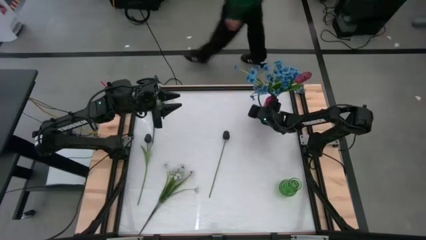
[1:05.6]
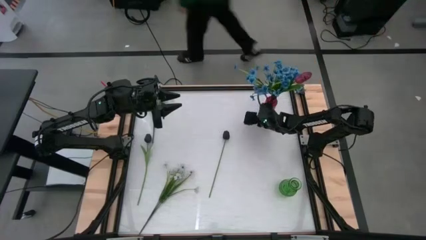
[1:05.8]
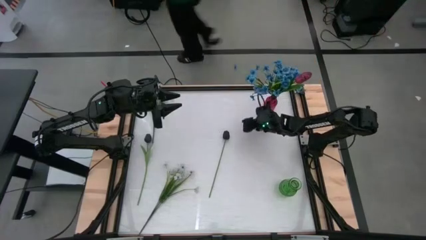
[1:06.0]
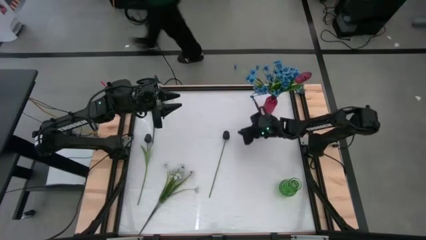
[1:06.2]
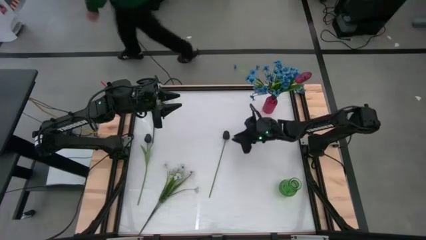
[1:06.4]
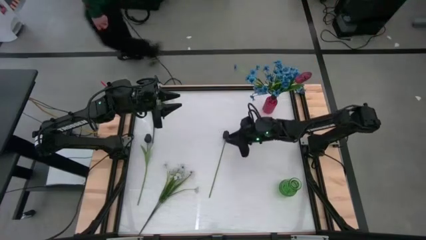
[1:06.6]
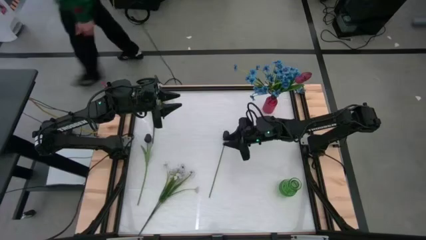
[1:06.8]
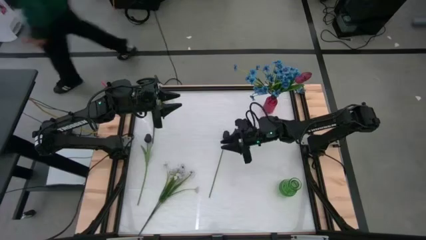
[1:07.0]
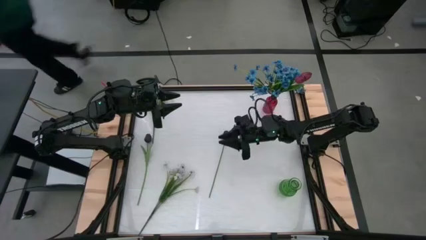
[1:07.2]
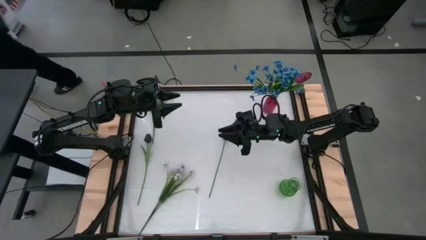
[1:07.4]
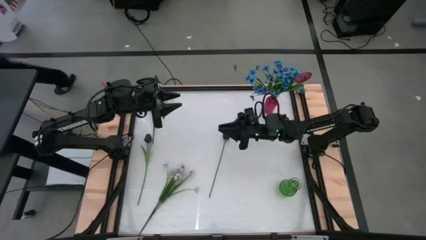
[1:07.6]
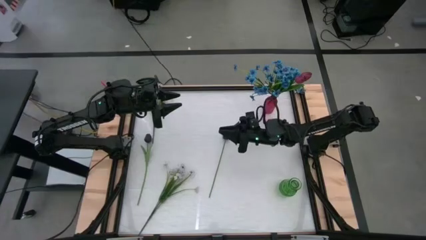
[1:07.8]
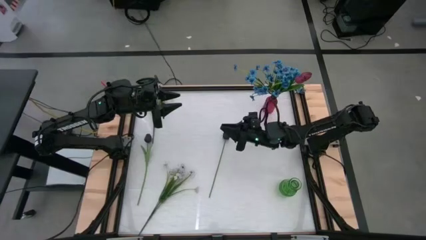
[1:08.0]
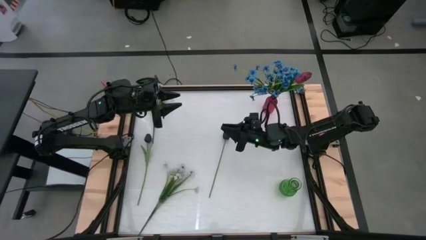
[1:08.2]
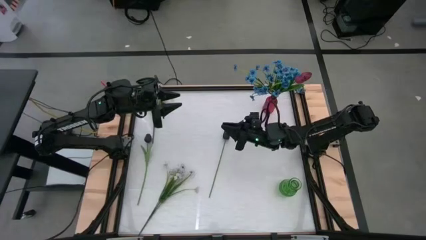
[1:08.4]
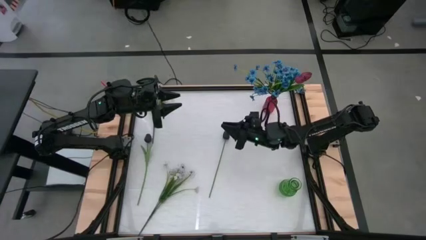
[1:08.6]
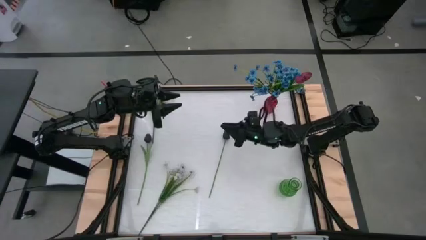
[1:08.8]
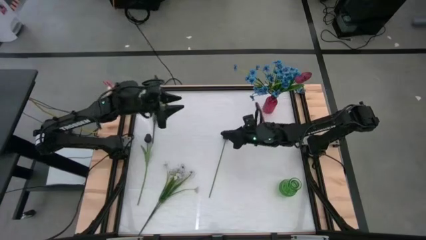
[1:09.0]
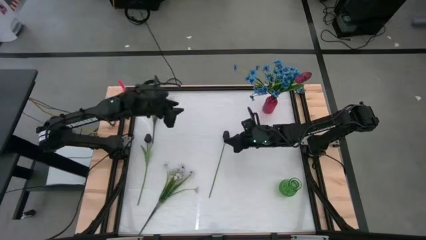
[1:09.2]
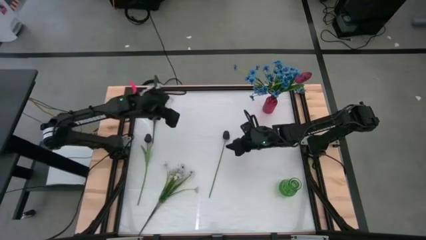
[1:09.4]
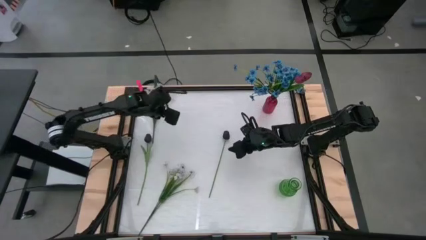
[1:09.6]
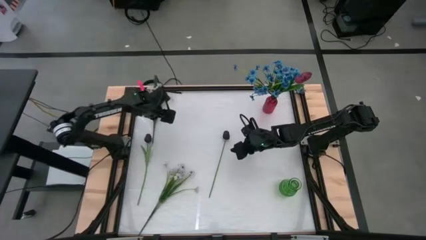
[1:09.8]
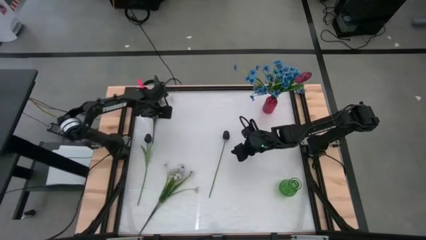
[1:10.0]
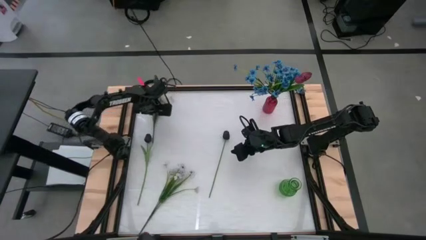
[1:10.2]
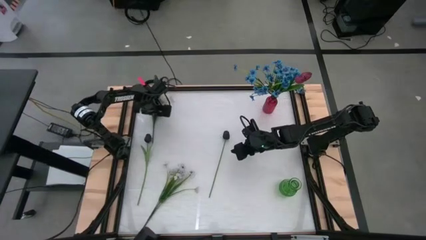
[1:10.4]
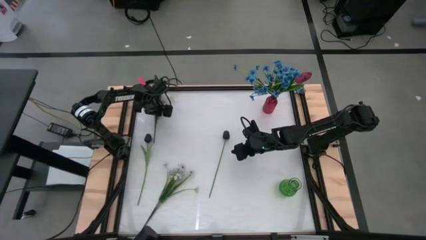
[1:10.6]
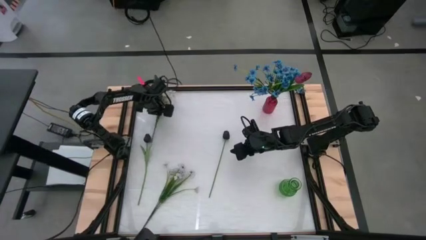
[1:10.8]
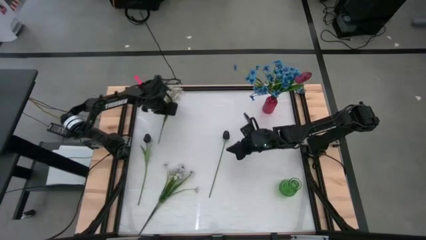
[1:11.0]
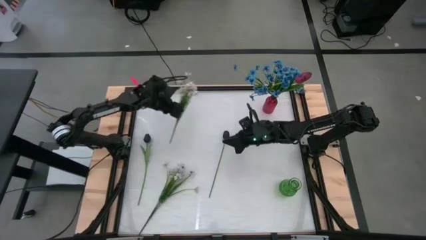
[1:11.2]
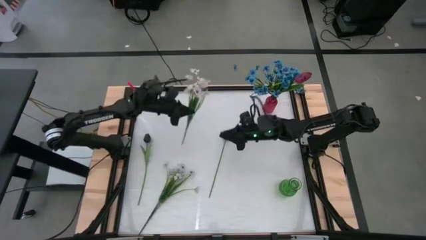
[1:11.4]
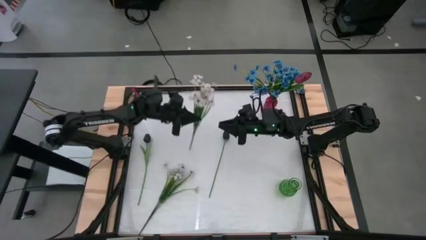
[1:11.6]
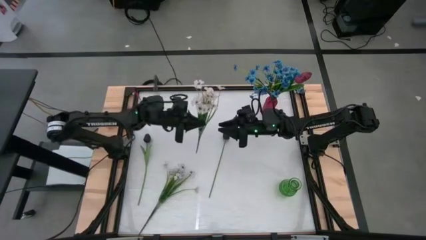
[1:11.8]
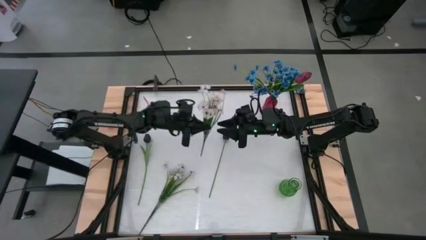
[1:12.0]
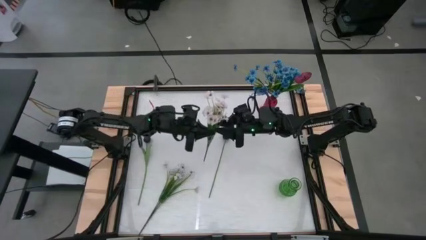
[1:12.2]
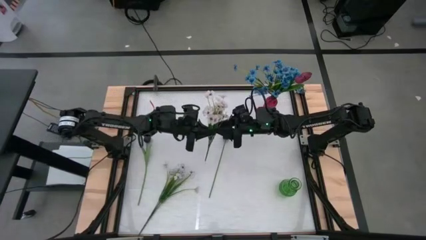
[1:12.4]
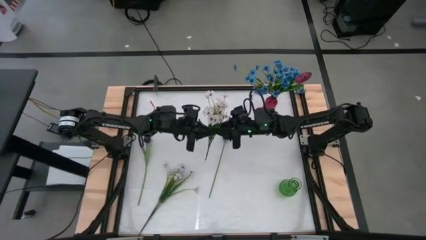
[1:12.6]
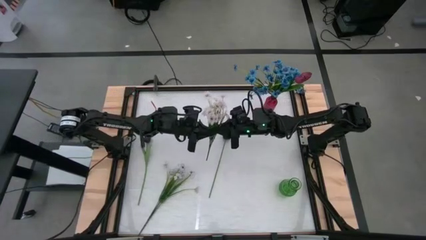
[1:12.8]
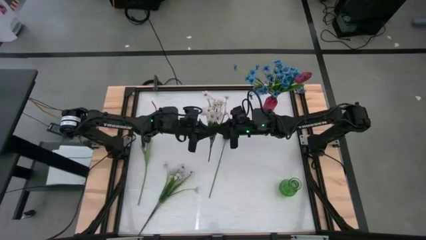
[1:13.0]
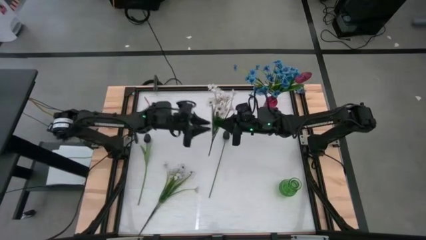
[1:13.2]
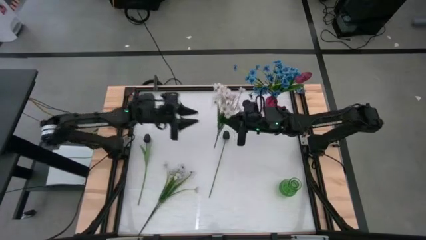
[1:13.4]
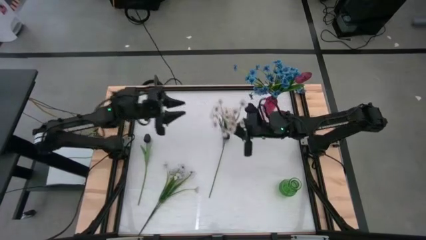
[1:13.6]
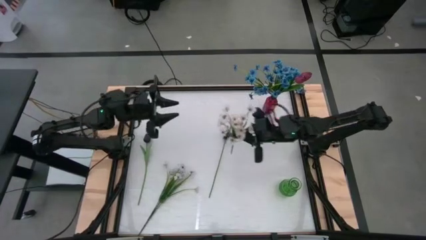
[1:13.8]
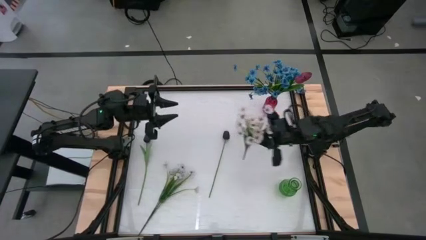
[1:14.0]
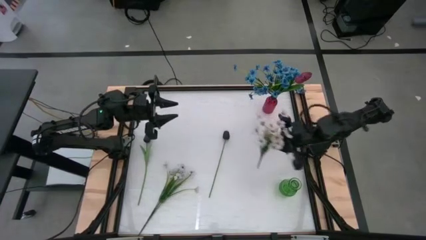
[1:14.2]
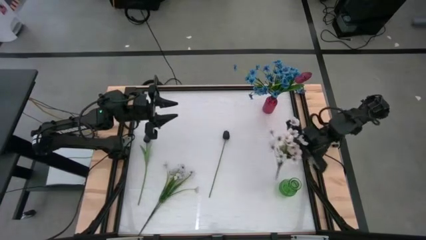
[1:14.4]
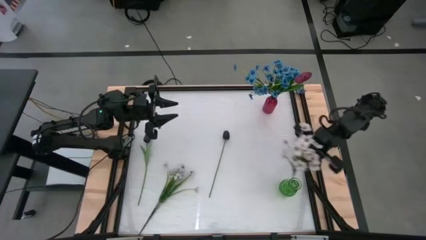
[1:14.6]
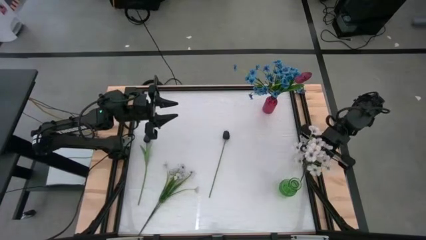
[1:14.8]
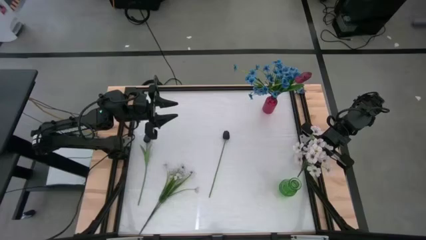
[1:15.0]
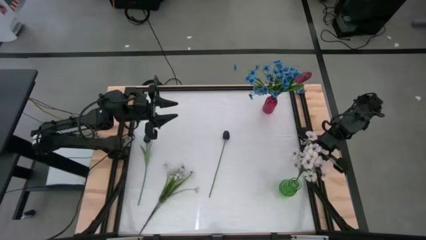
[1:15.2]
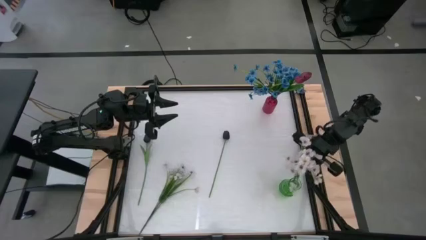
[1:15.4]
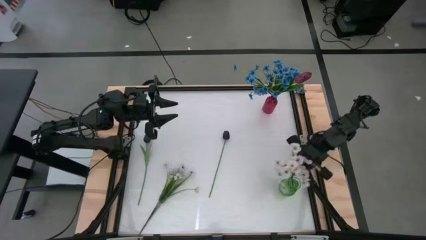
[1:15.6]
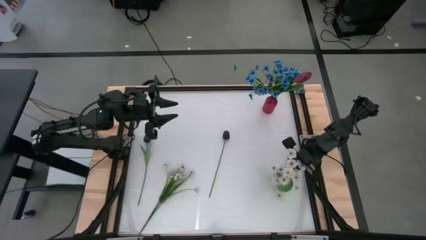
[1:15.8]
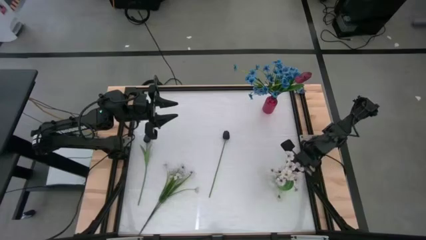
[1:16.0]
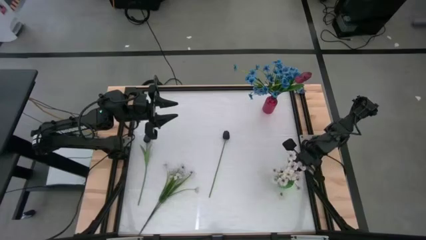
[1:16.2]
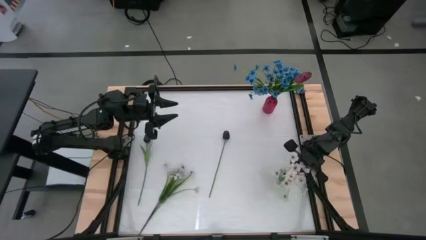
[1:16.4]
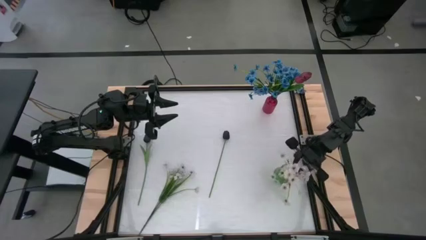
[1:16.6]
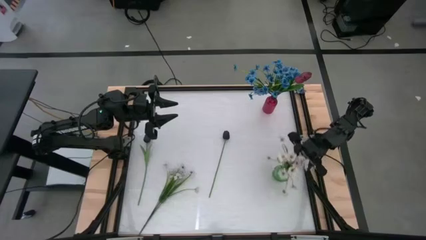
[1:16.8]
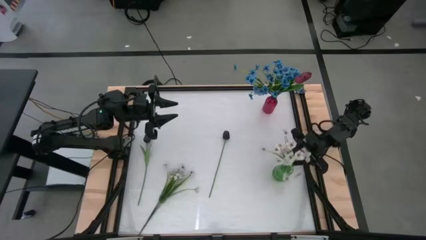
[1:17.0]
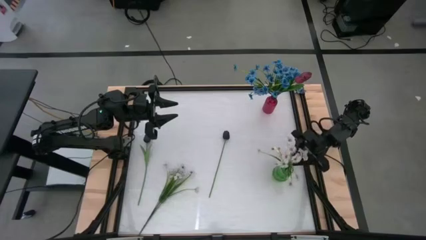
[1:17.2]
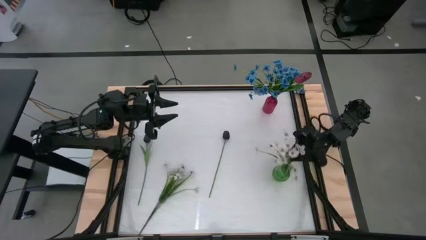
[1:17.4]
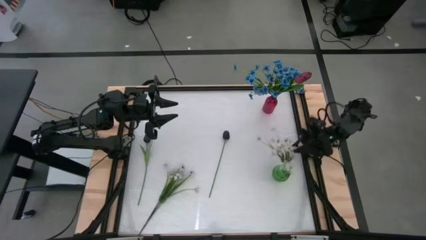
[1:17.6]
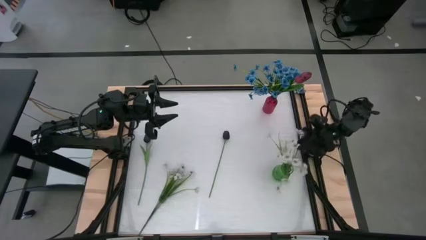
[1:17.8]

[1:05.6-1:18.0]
Task: Sort flowers into vase by color
Put the top white flowers into the green vase

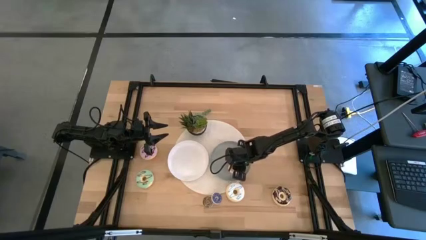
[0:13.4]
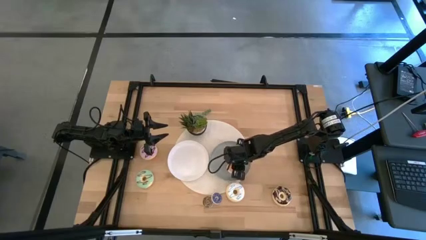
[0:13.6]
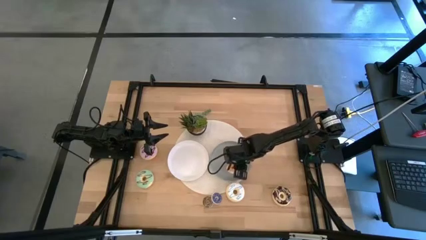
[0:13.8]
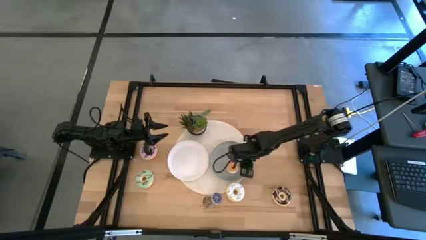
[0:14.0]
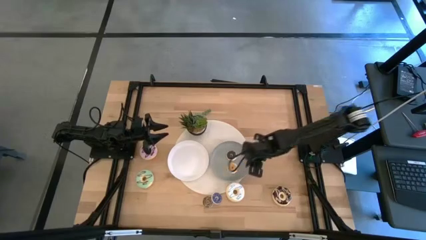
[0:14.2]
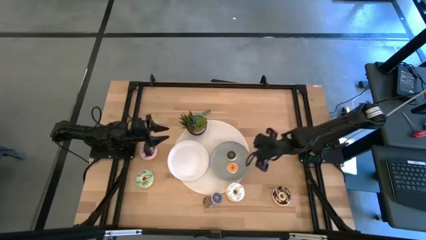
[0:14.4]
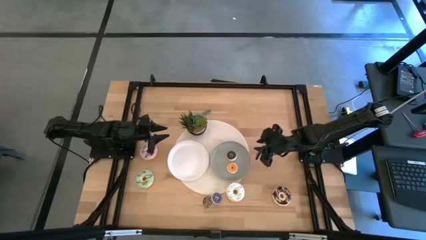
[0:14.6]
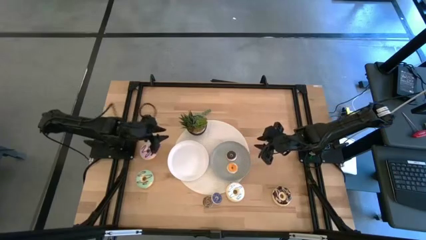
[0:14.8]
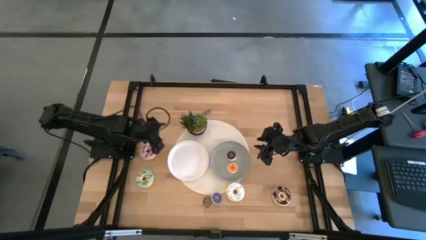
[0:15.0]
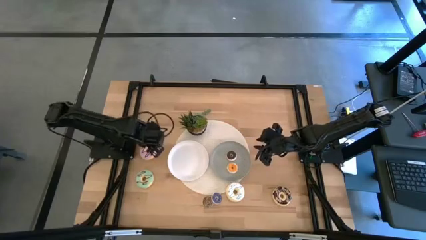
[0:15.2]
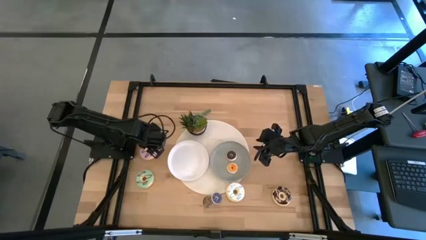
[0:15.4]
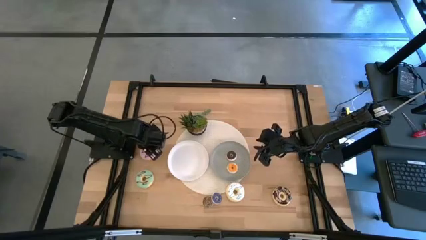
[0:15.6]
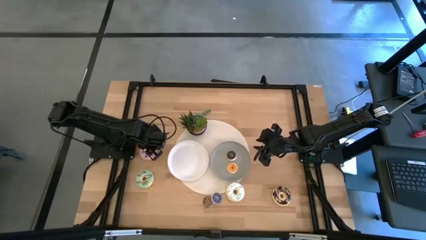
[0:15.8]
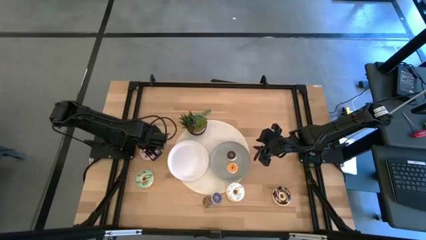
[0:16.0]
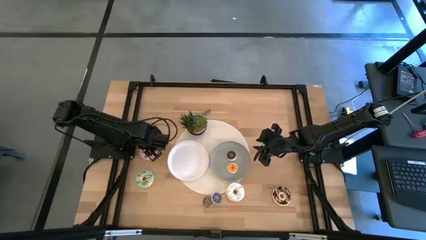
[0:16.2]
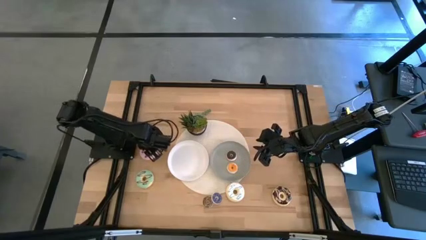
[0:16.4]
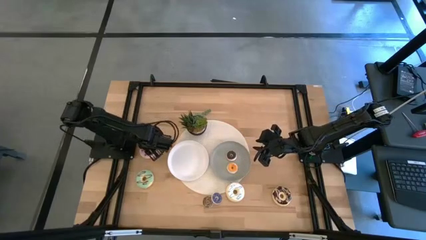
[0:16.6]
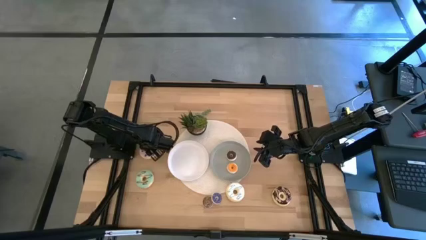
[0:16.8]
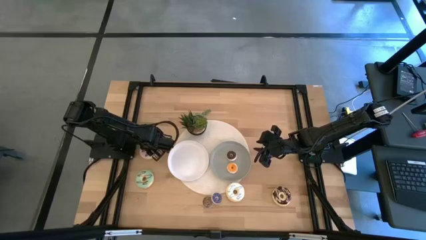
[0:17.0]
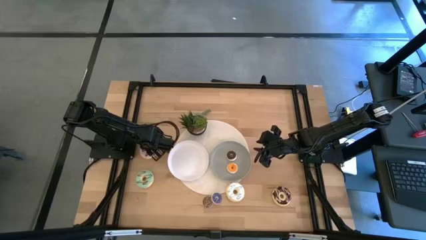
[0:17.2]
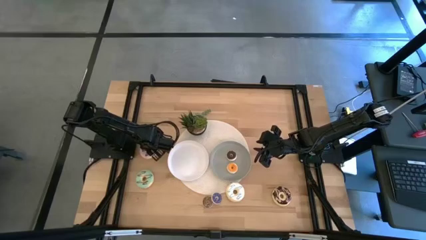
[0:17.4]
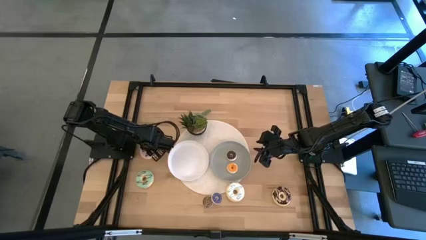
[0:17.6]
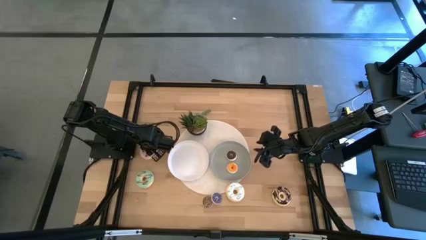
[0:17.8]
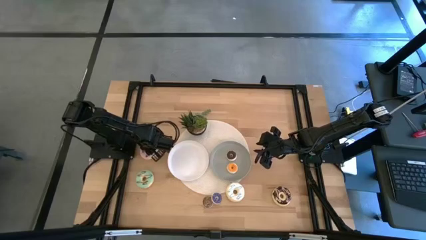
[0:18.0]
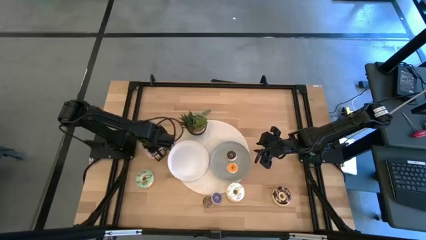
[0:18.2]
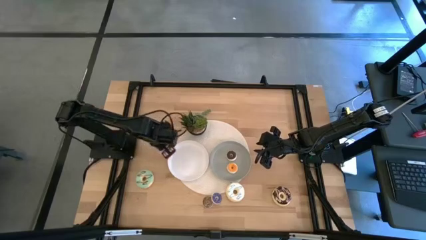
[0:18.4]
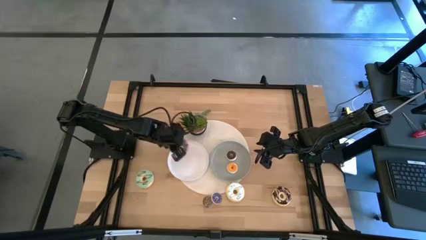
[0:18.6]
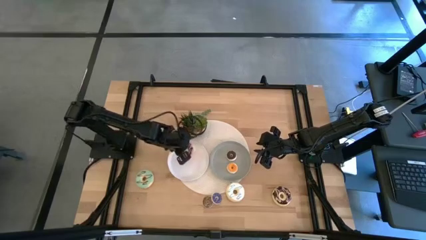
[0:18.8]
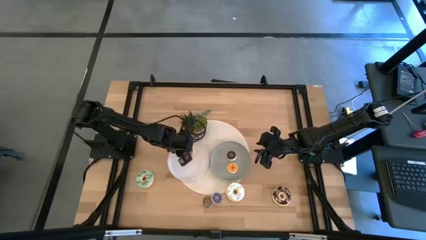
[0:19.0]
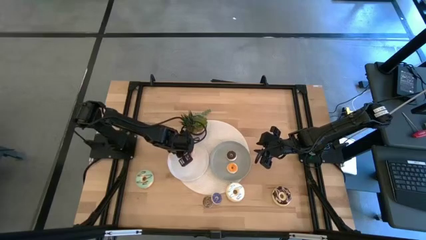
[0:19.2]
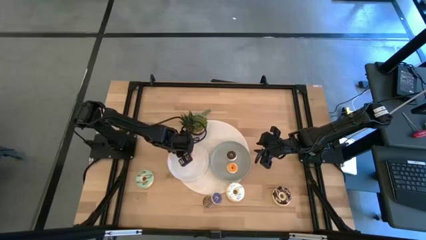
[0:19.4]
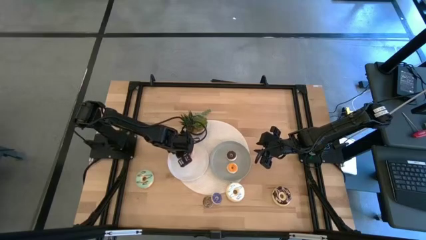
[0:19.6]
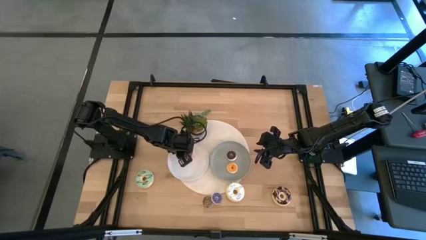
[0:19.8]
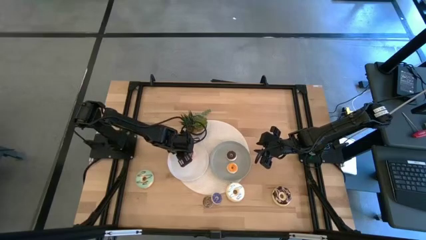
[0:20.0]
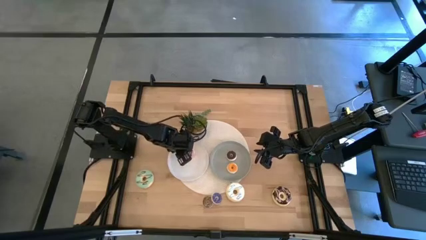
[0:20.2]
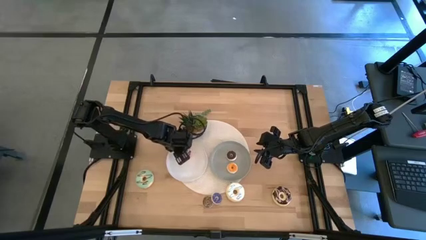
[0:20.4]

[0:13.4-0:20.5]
Task: Pick & Place donuts
Put the big purple donut onto the white plate
